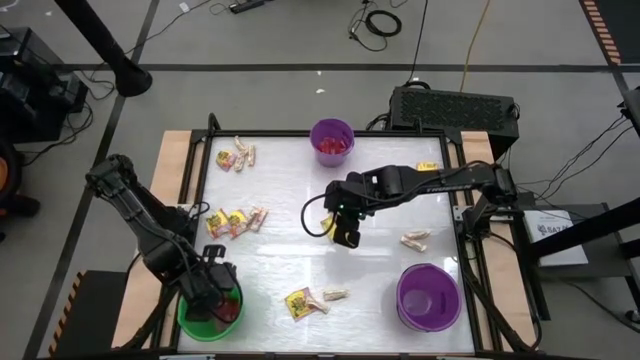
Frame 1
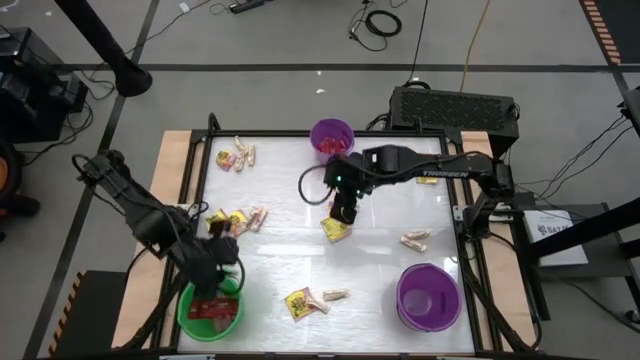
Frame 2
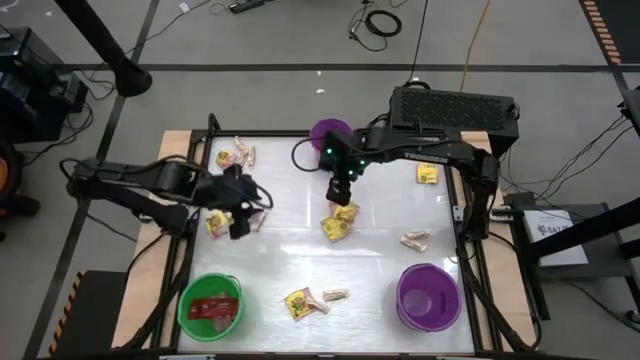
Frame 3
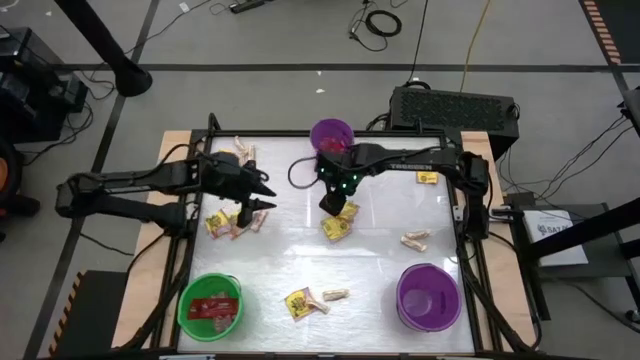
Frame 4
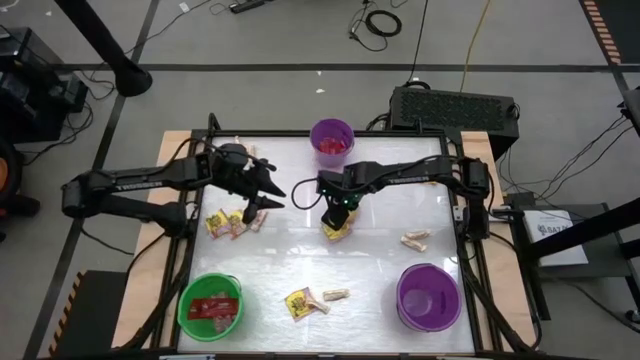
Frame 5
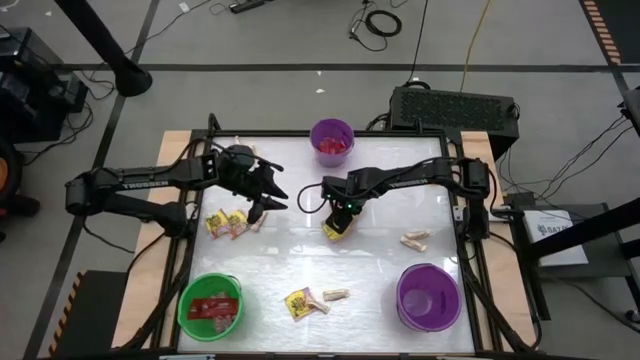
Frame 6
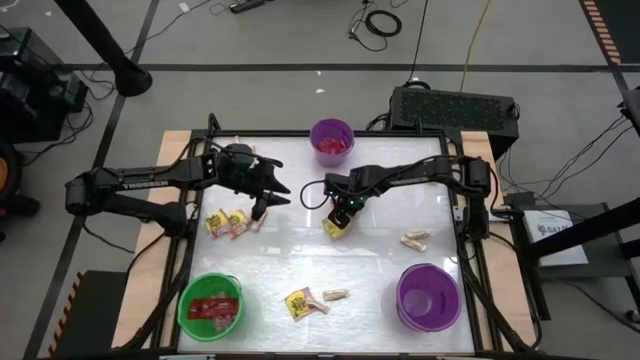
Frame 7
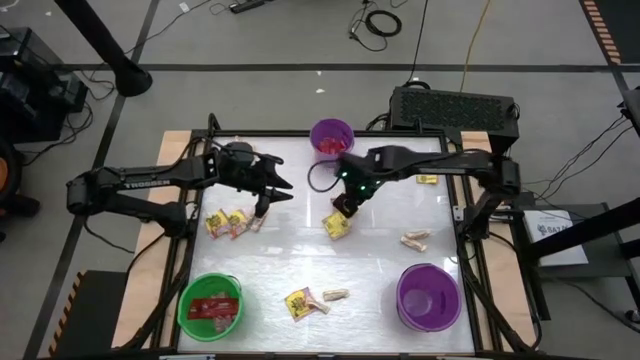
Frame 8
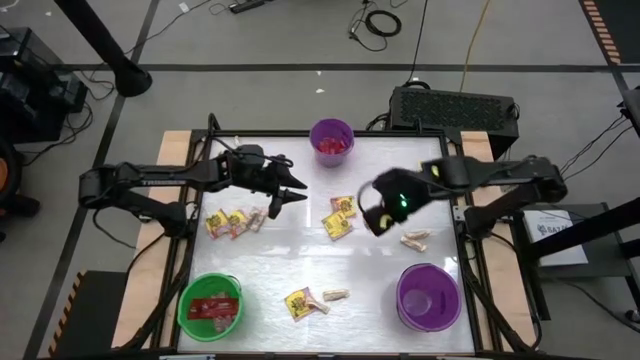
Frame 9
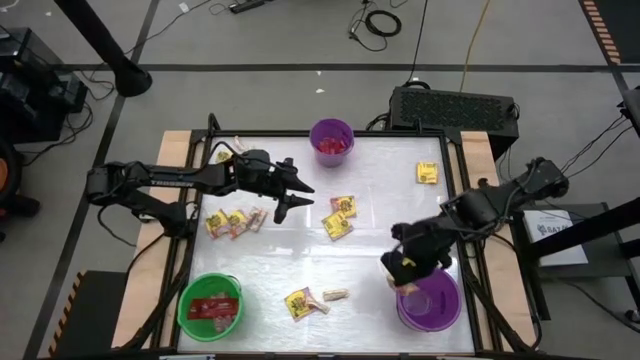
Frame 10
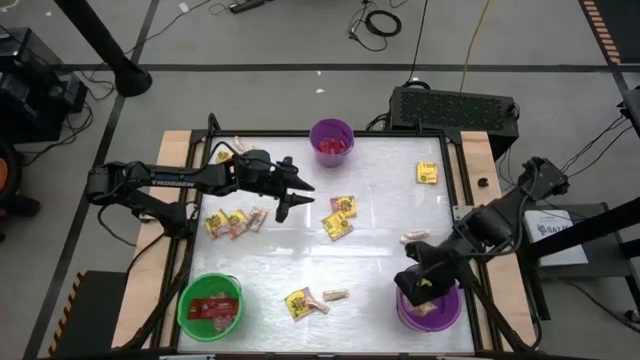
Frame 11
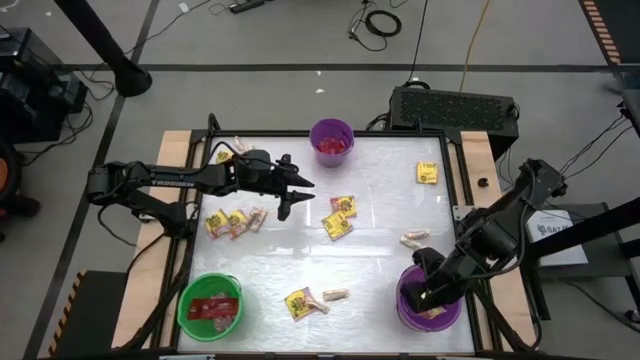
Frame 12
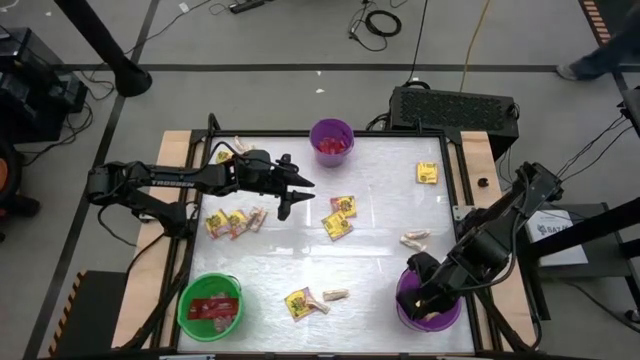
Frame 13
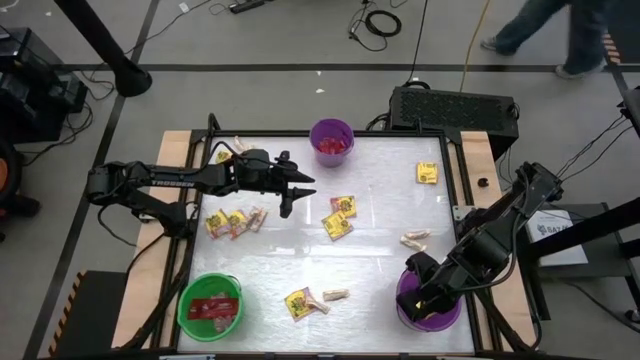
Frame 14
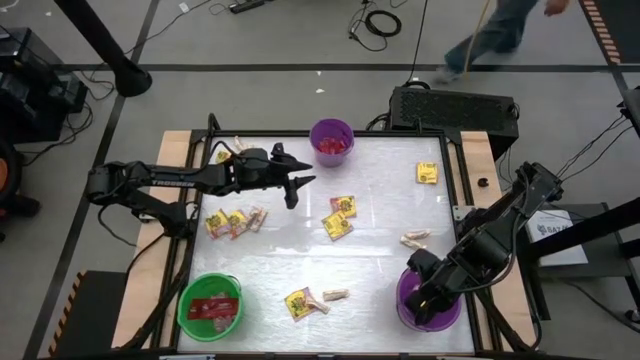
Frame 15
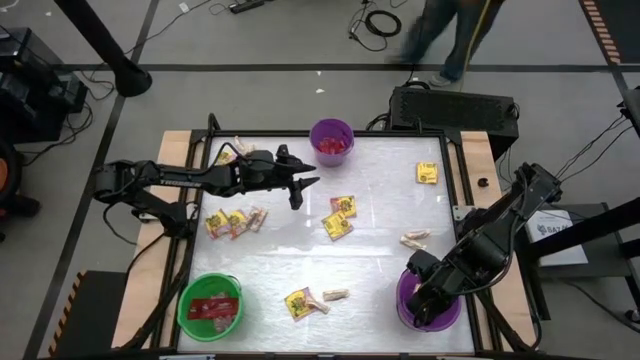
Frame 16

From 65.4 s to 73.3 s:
Task: Sort candy by brand, put in halloween buckets
Put the yellow candy into the bottom purple bucket

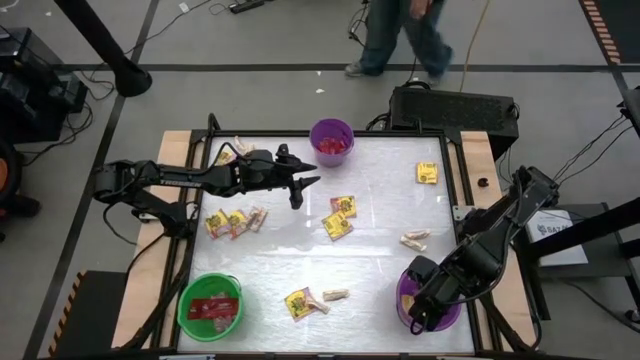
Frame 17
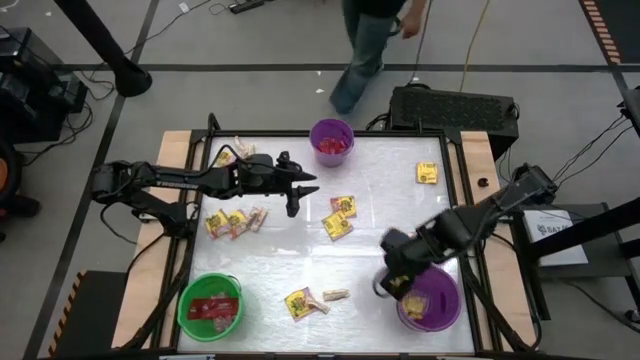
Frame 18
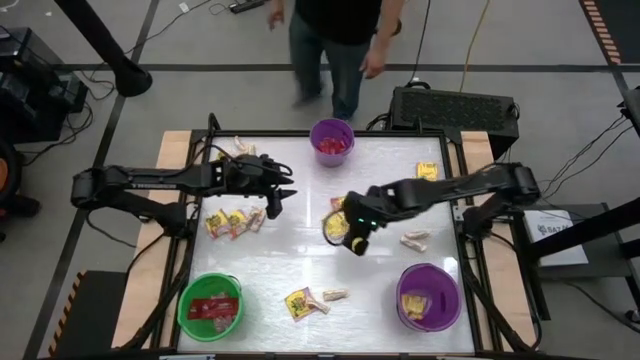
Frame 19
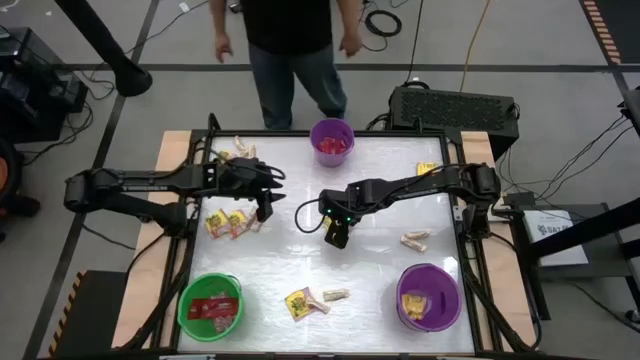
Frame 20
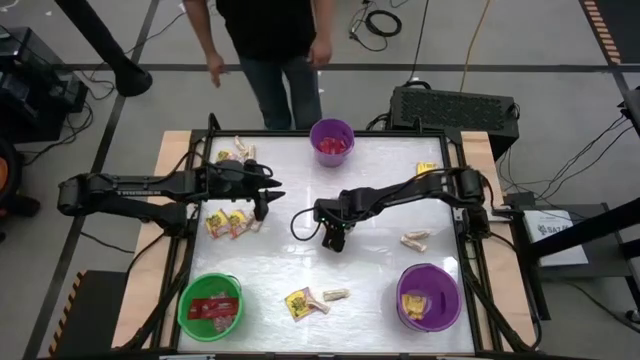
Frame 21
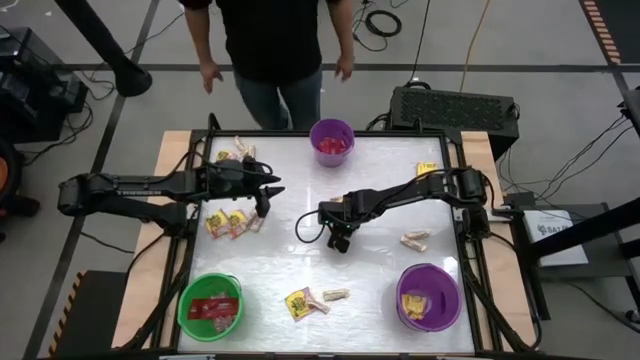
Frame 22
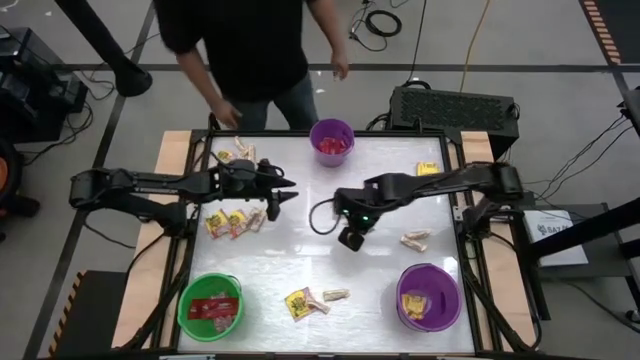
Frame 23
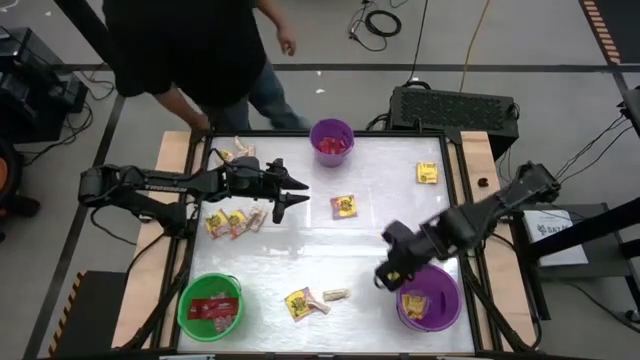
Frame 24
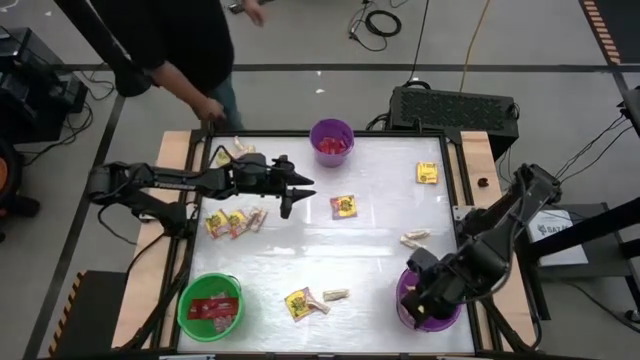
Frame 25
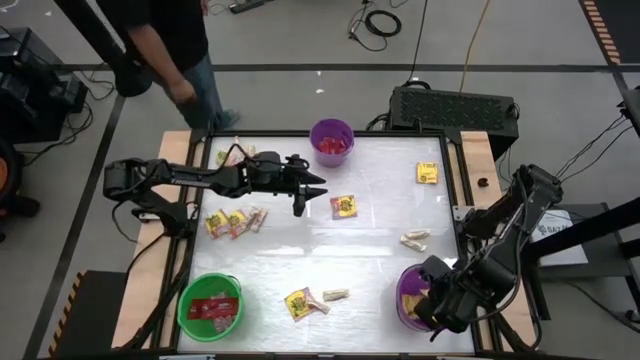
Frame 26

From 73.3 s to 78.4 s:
Put the yellow candy into the bottom purple bucket

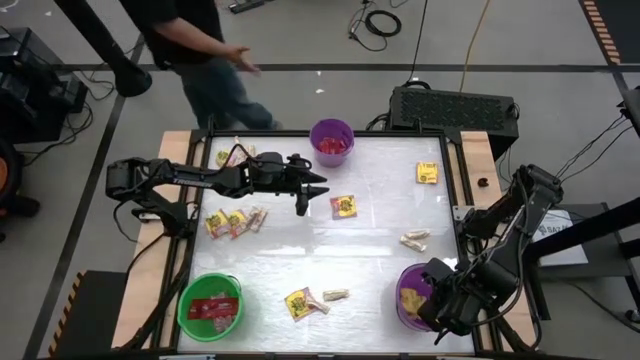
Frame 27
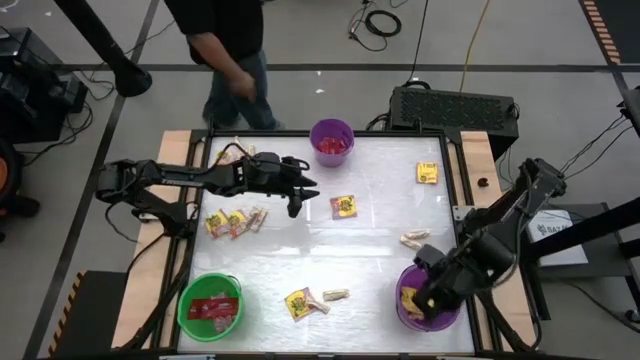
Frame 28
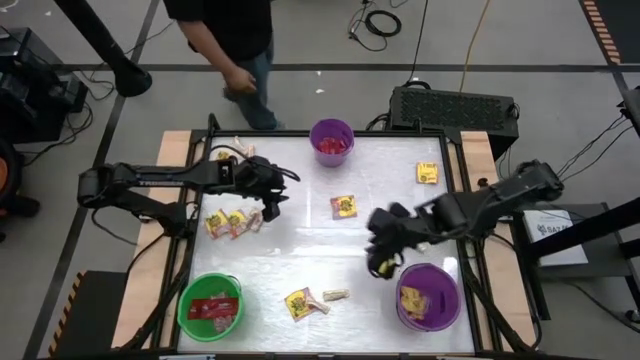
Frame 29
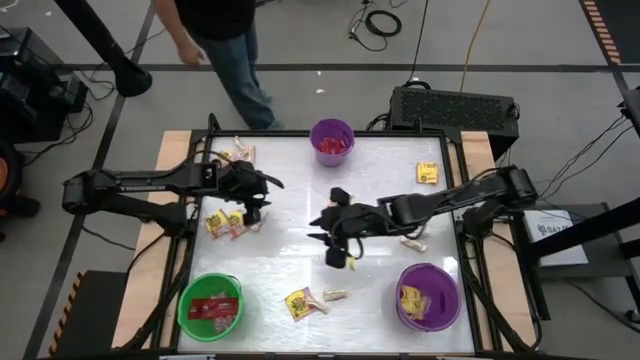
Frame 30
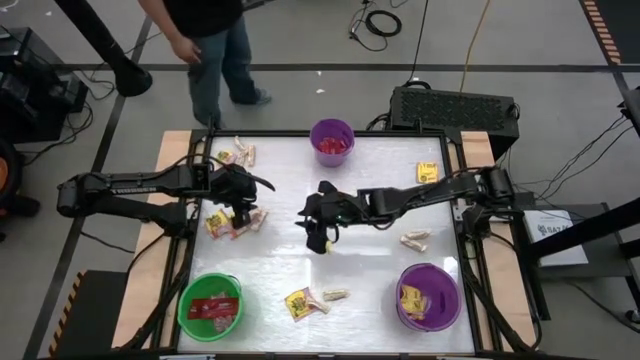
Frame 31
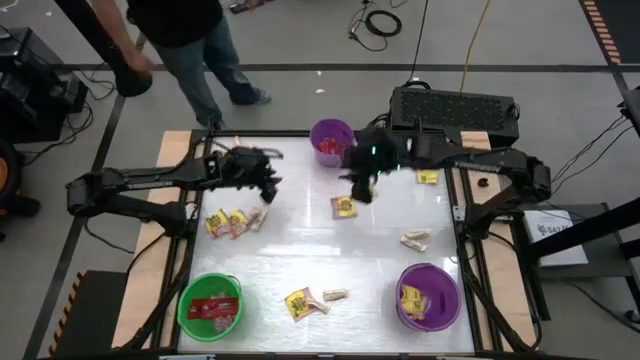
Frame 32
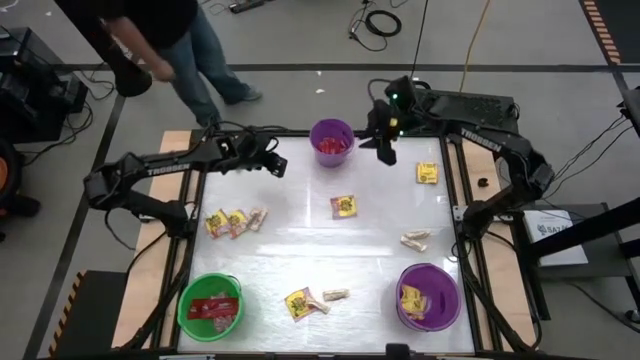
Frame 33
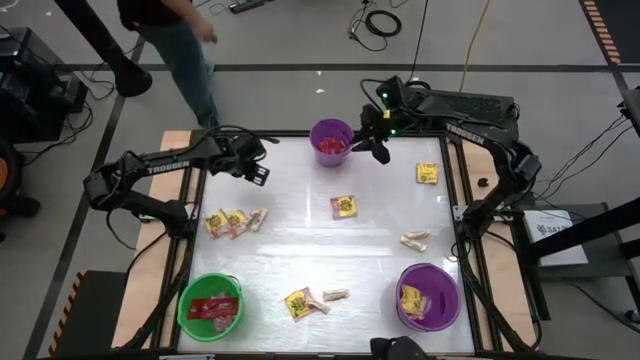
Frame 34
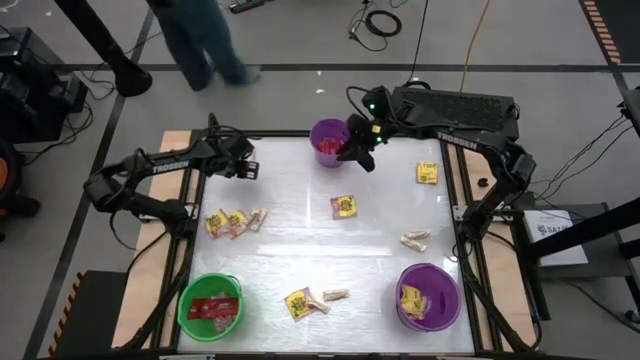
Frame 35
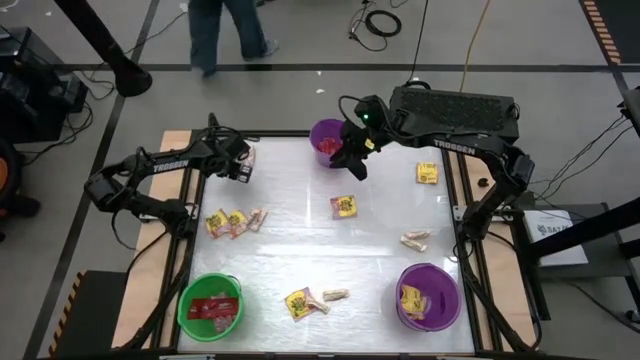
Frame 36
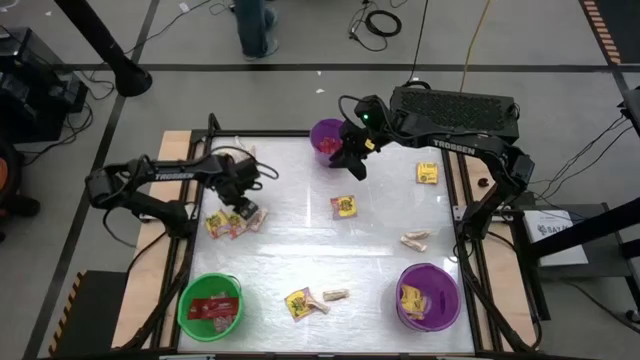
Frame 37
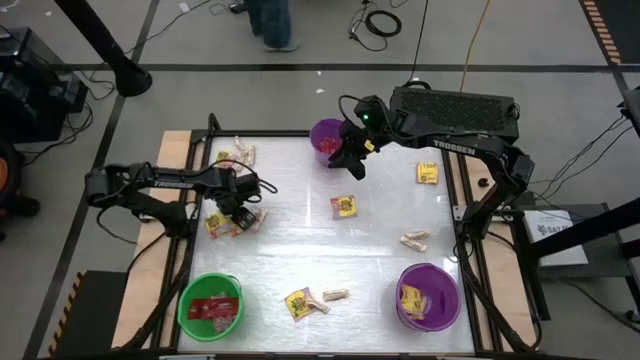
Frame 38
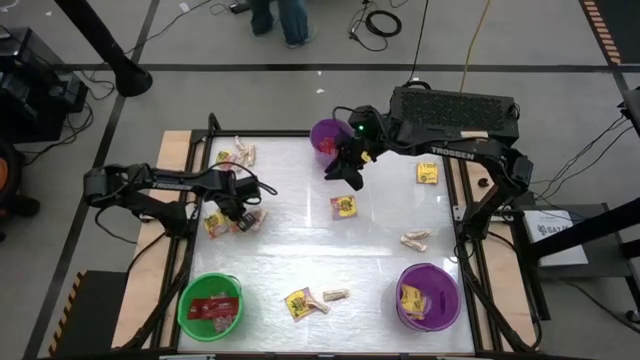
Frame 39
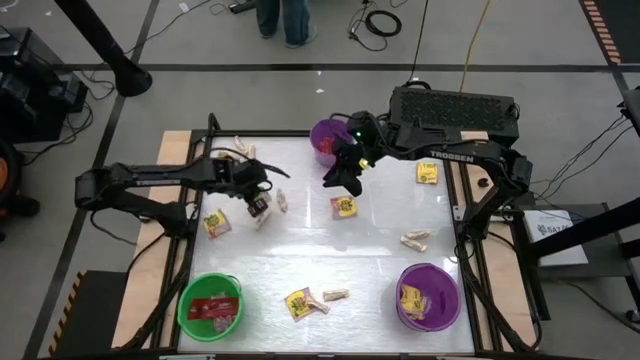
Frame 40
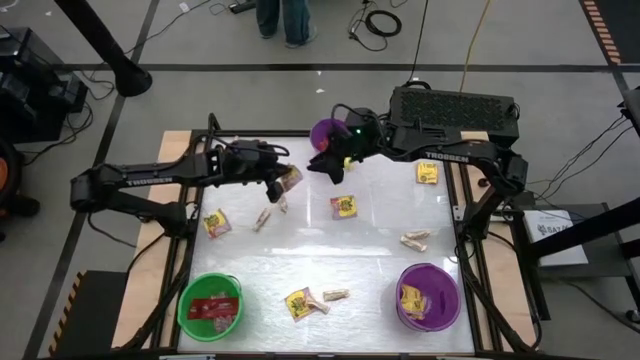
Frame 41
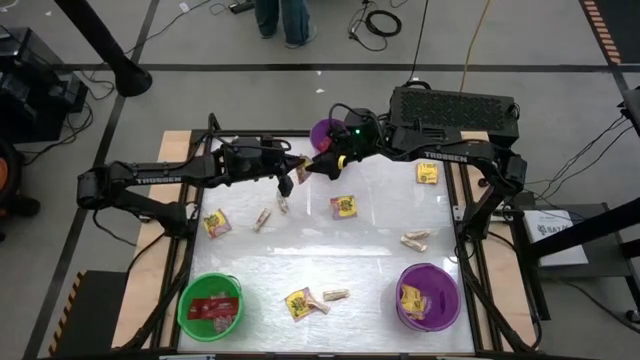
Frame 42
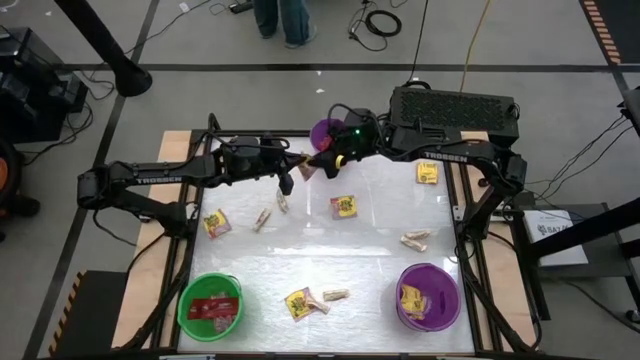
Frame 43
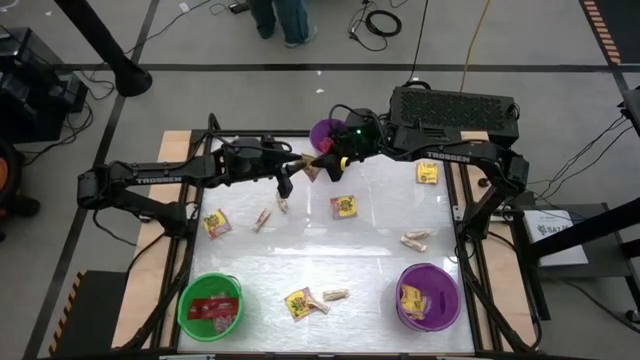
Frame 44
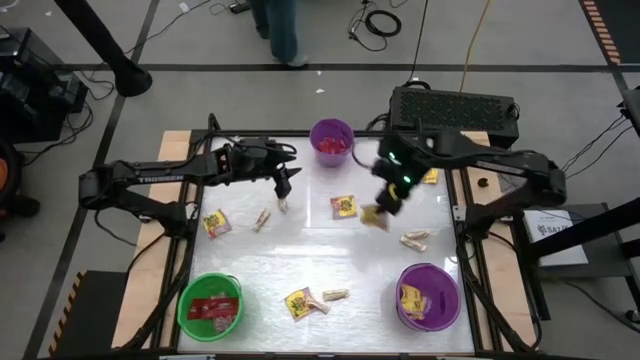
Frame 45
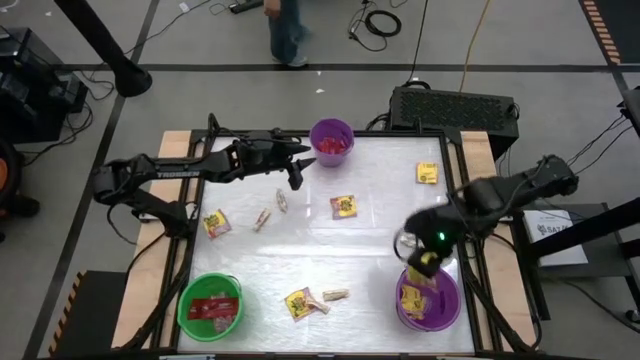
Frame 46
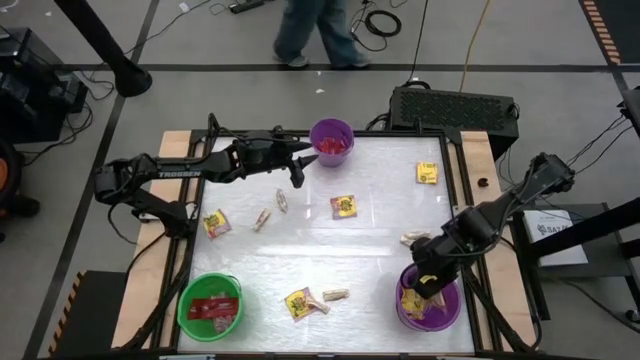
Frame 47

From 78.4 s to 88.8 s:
Put the yellow candy into the bottom purple bucket
